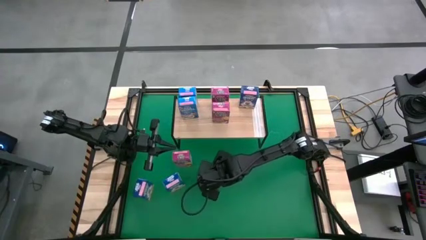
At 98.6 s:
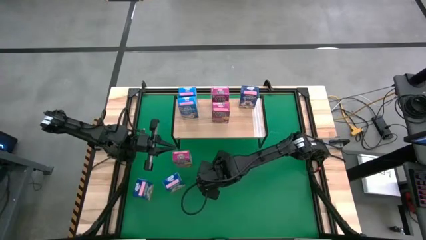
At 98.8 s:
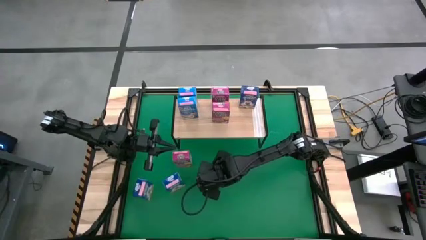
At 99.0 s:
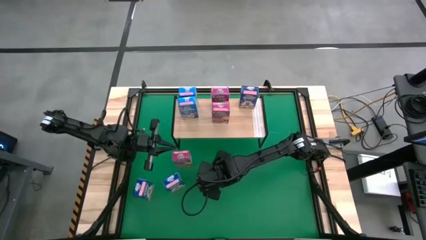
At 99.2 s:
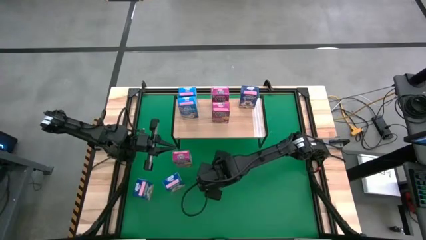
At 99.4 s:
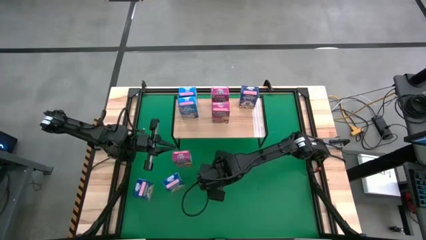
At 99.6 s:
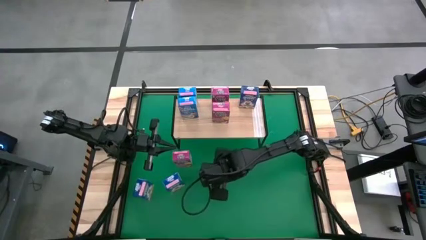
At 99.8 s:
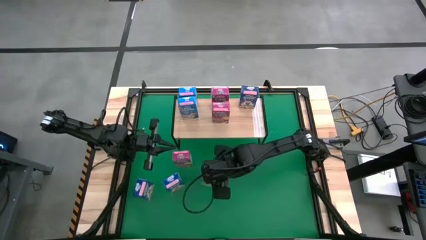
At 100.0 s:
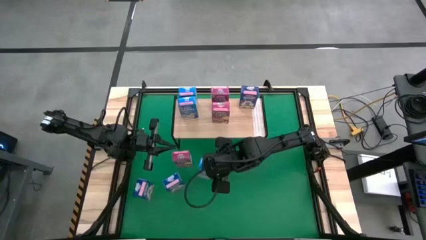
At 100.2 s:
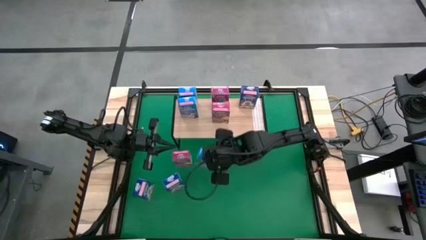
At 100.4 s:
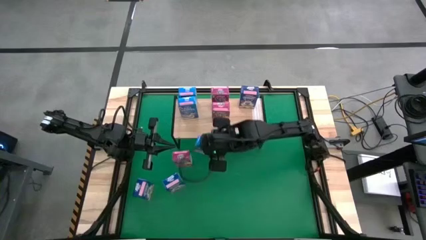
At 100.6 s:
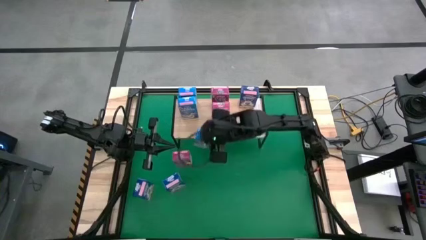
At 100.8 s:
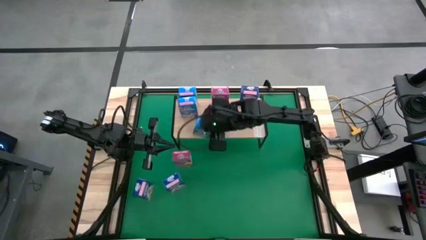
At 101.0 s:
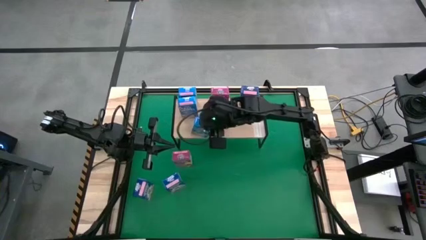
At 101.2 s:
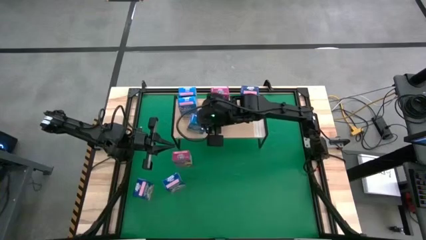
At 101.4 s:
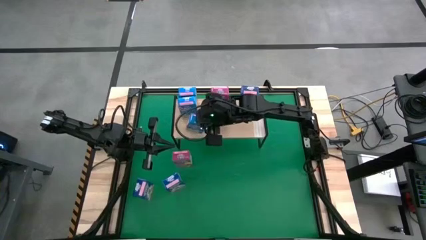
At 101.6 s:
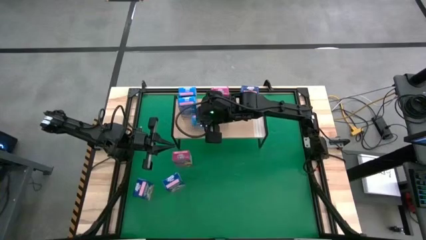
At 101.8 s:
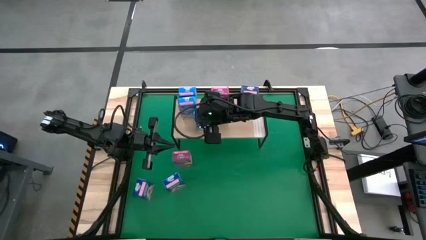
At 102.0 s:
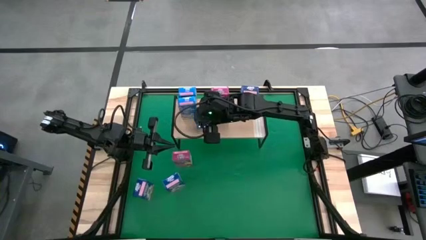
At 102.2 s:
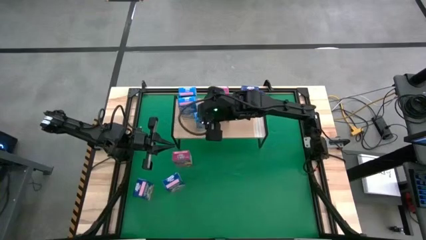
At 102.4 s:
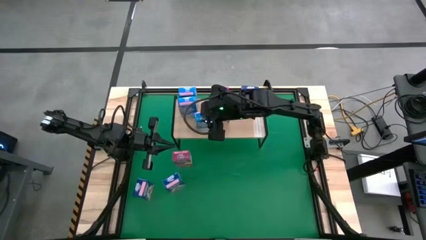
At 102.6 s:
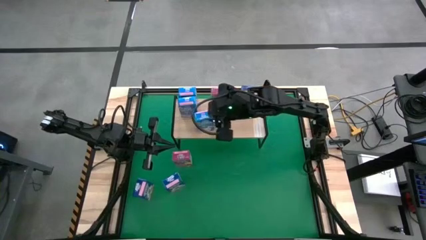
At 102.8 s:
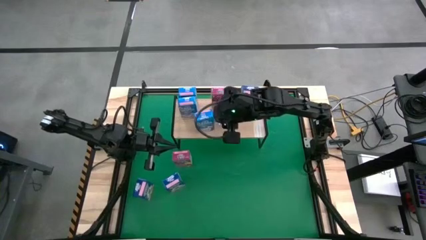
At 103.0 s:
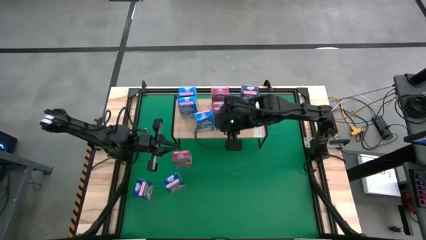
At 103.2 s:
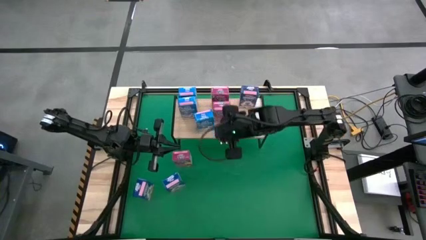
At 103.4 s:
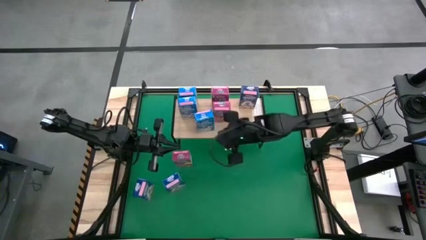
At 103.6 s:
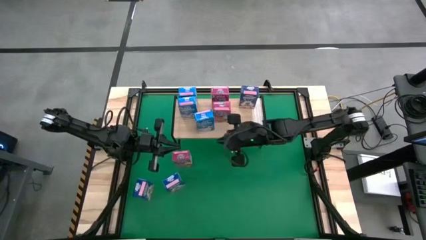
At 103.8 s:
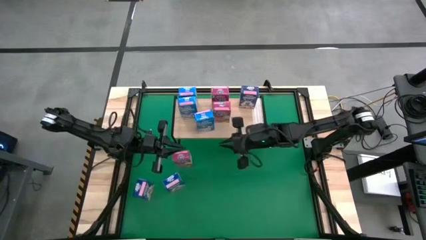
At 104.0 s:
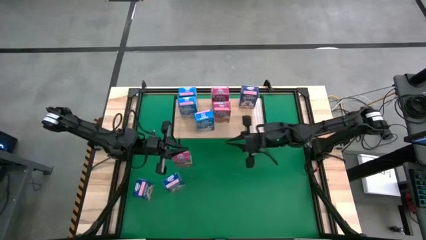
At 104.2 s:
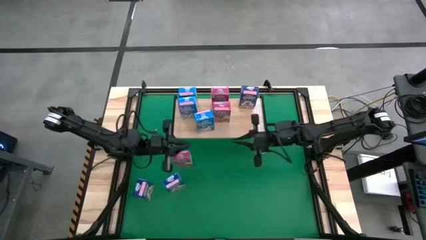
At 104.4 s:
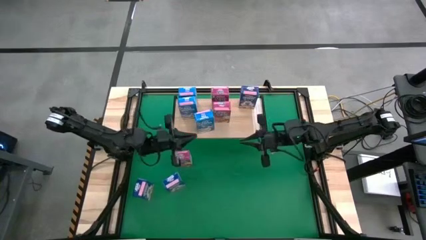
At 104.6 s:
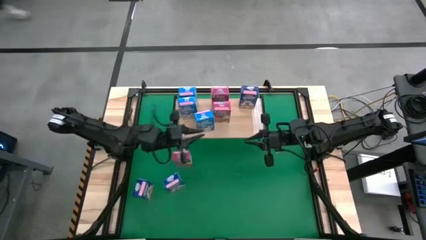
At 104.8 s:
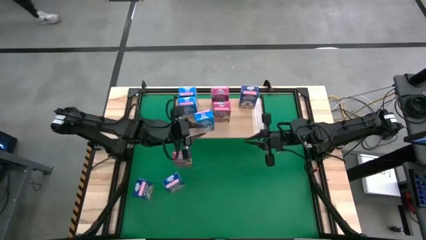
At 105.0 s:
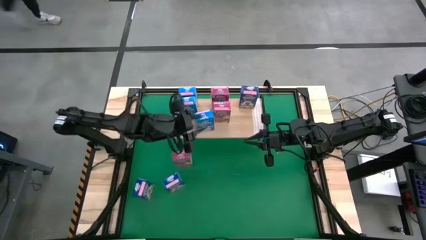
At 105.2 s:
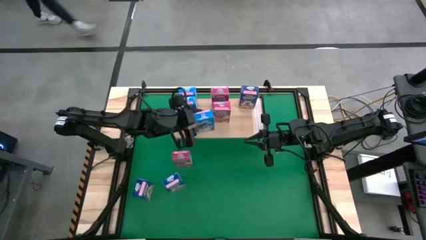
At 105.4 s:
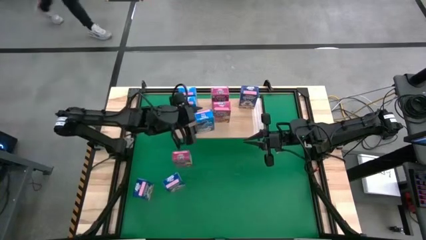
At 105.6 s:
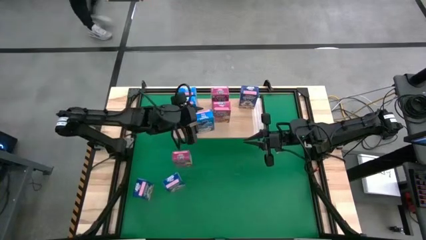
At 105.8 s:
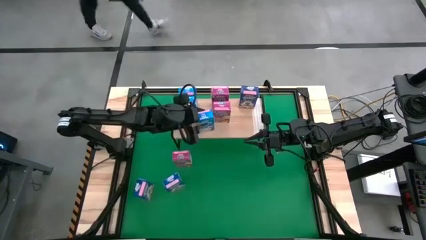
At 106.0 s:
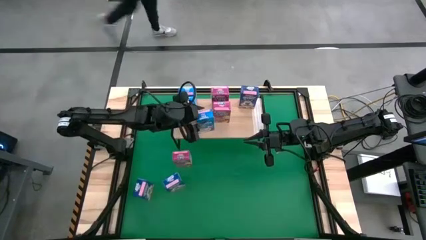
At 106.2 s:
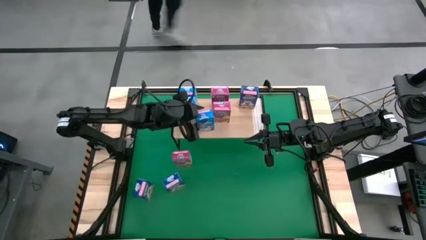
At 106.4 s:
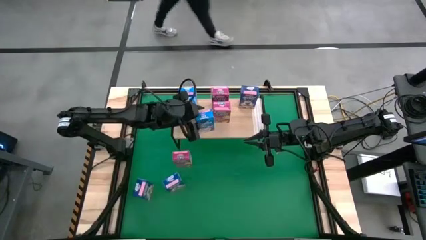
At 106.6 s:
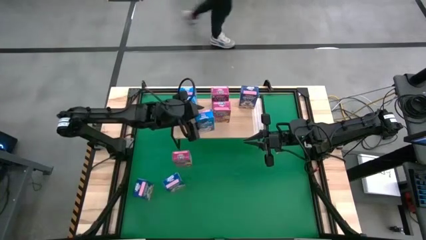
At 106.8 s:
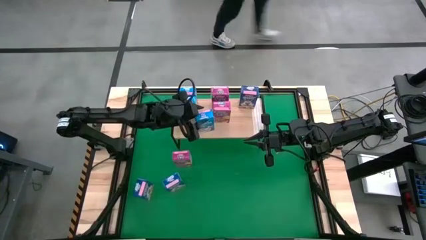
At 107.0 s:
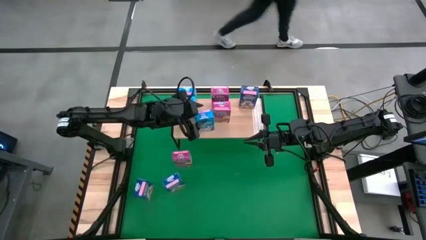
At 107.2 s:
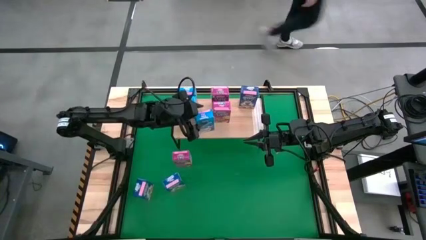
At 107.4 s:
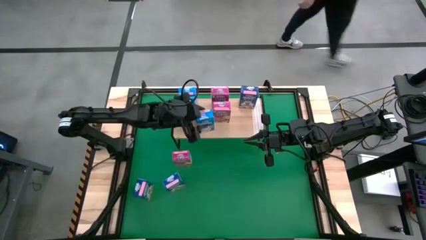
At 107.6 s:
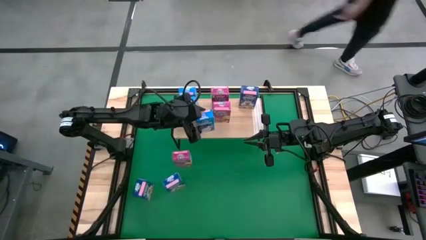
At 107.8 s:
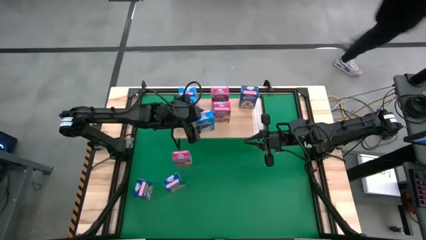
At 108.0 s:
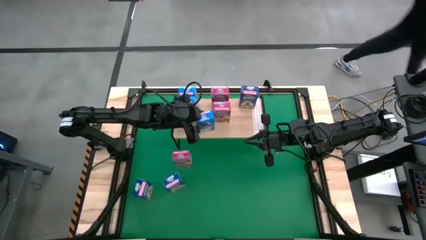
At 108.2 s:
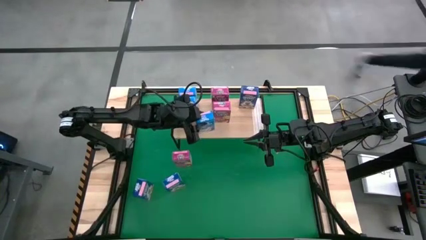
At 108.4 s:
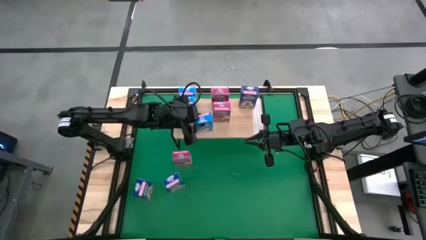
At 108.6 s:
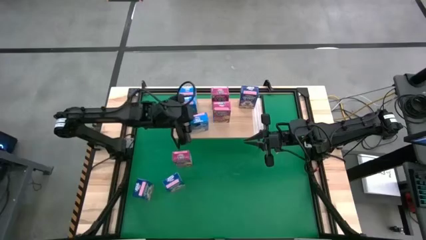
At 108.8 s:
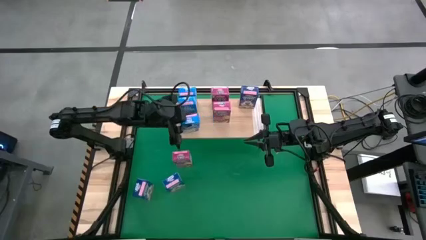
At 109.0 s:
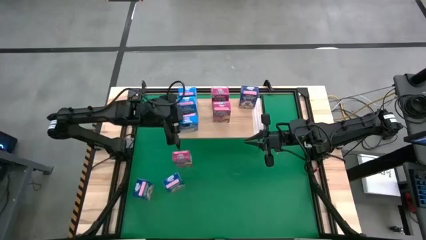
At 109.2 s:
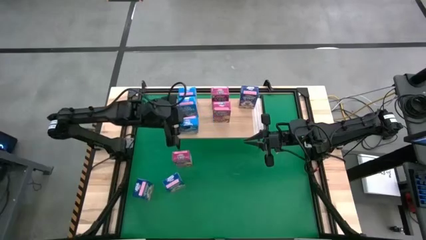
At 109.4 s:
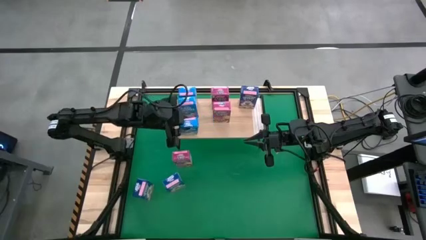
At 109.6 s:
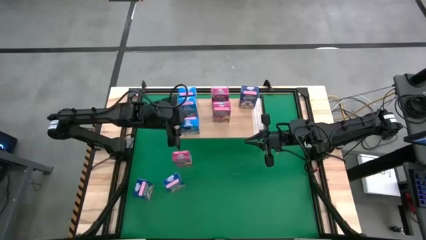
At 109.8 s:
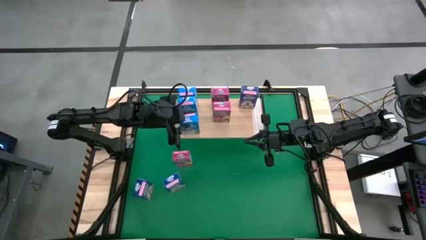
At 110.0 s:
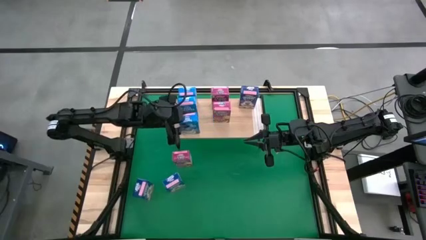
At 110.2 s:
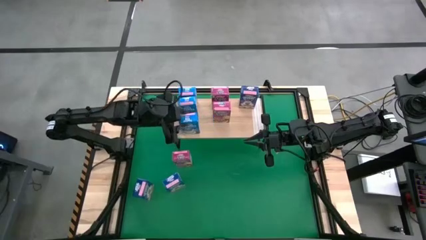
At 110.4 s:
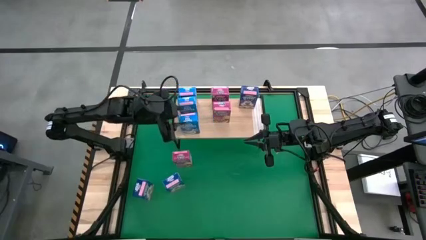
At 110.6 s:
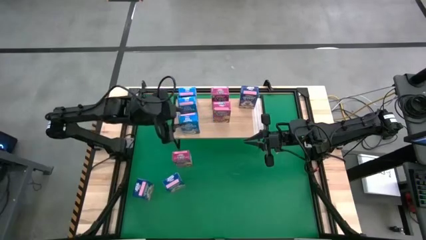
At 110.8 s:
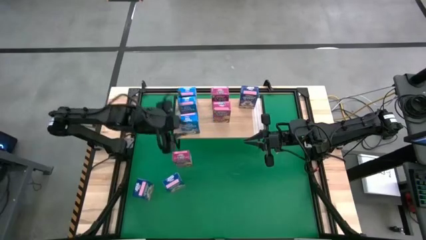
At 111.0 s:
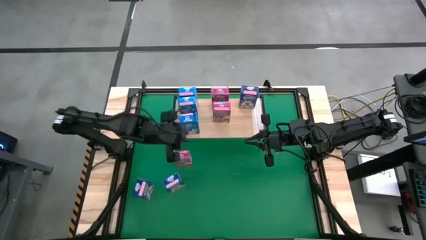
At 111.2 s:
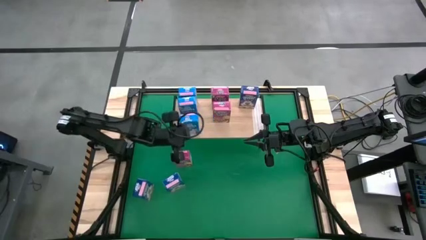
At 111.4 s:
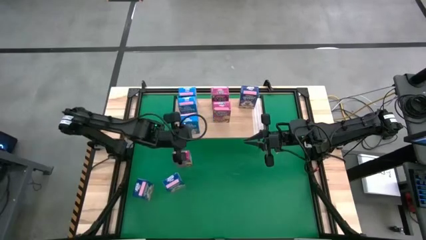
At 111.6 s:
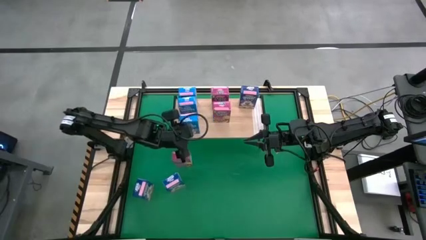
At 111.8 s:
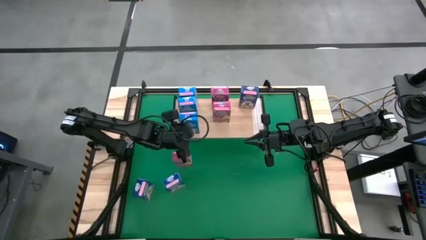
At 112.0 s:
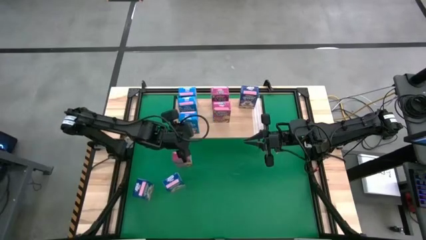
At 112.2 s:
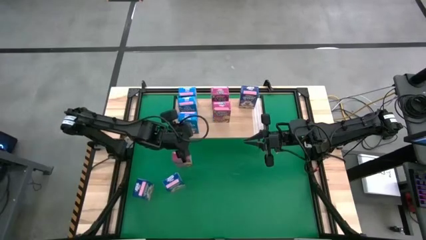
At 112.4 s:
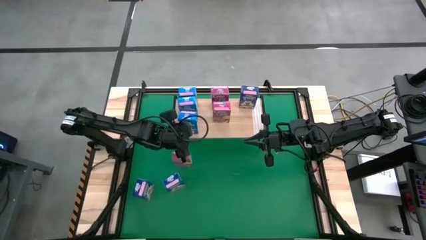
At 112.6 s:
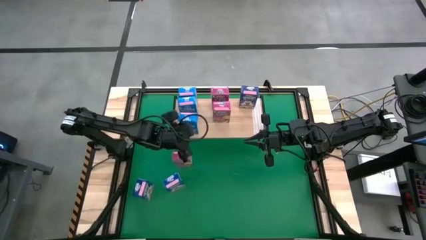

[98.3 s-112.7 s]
Task: Stack cereal on shelf
Put the light blue cereal box, aligned with the other light blue cereal box on the shelf
